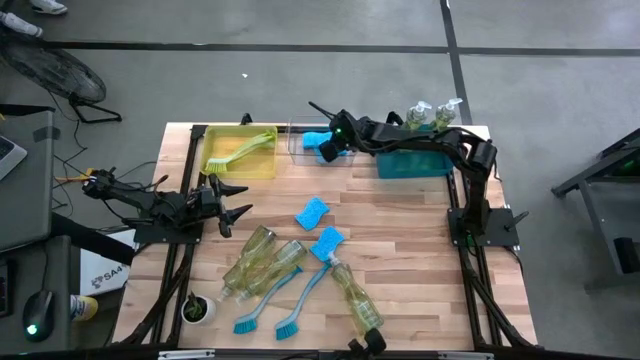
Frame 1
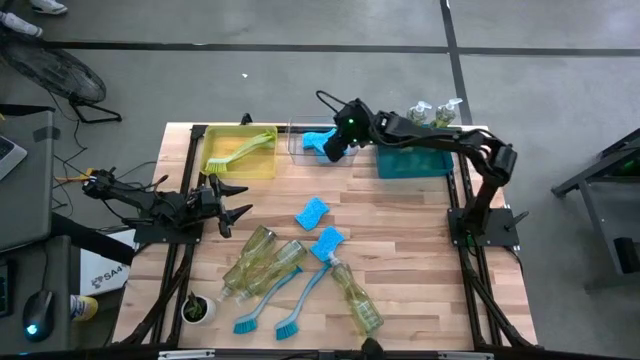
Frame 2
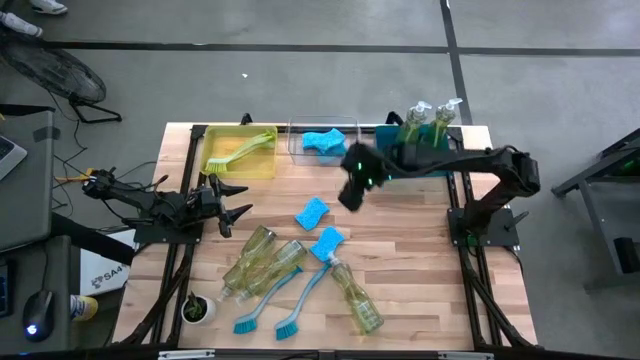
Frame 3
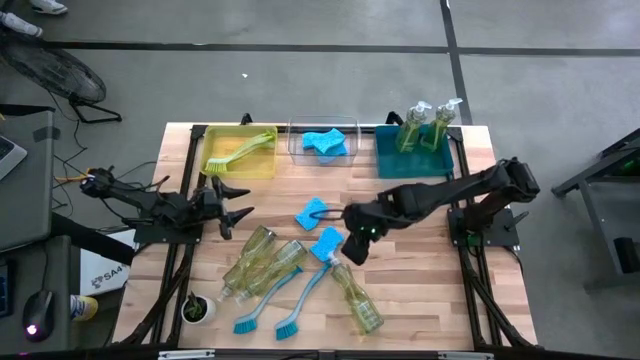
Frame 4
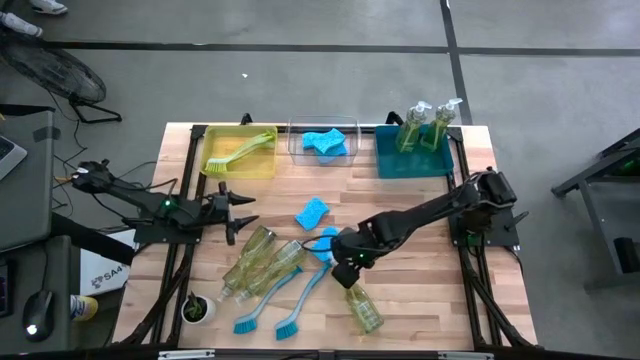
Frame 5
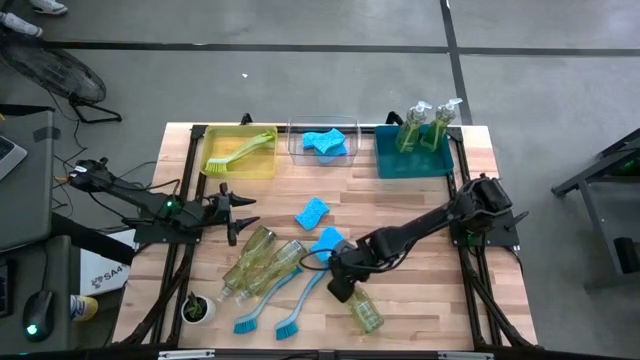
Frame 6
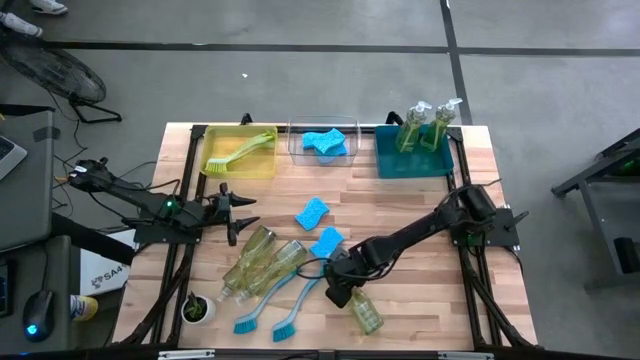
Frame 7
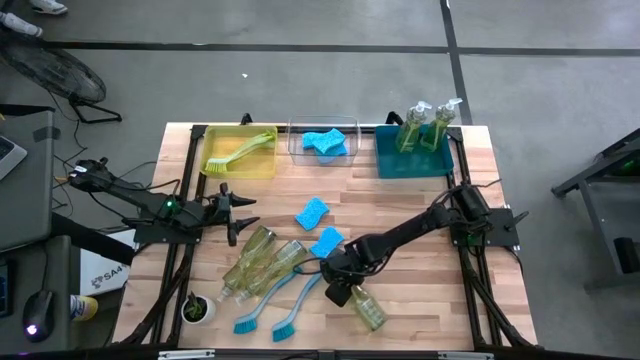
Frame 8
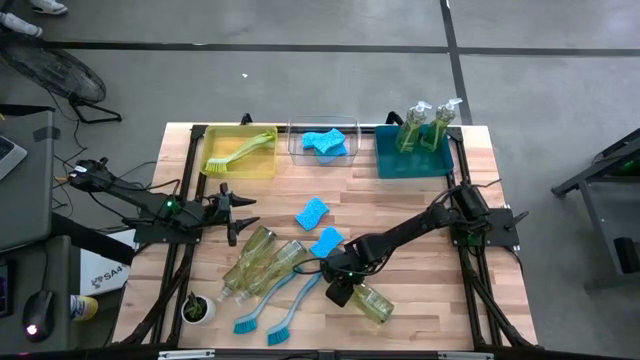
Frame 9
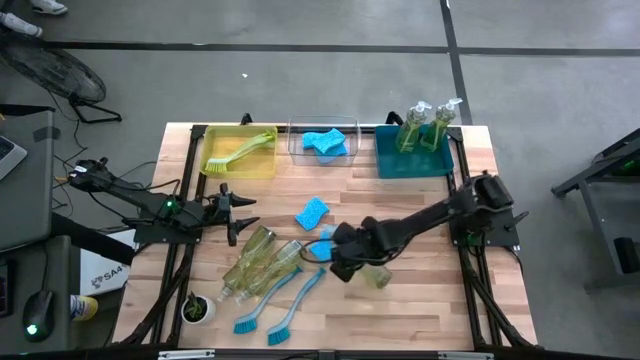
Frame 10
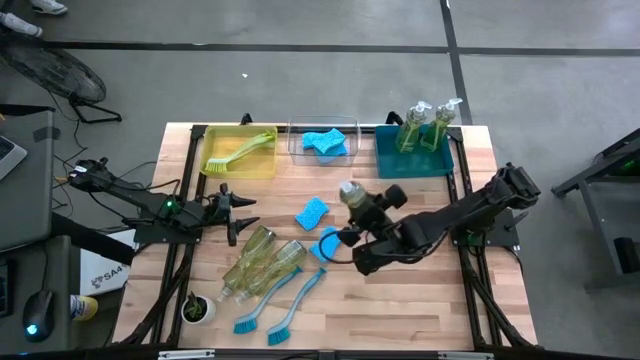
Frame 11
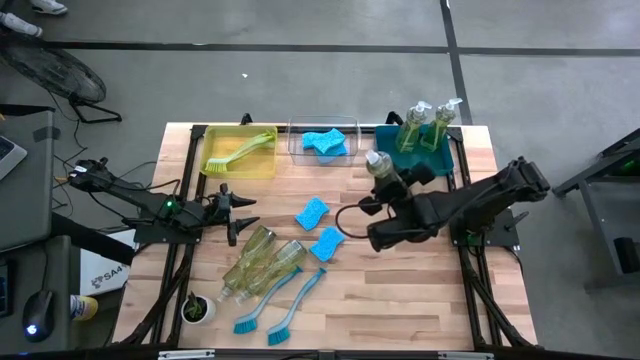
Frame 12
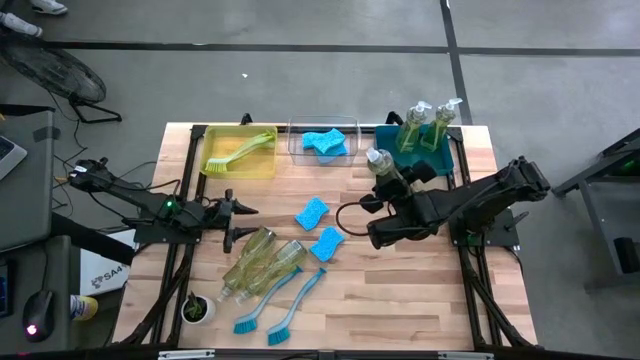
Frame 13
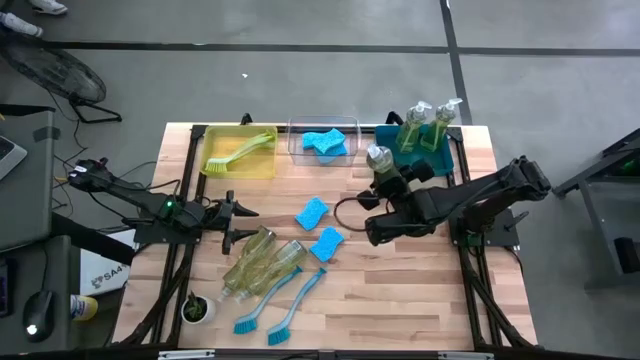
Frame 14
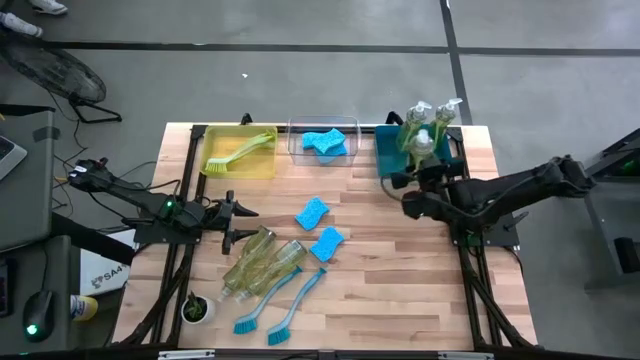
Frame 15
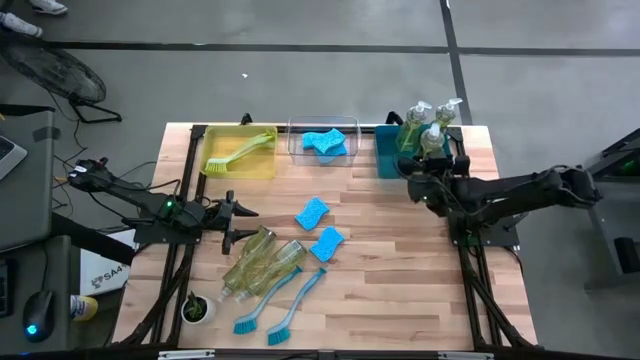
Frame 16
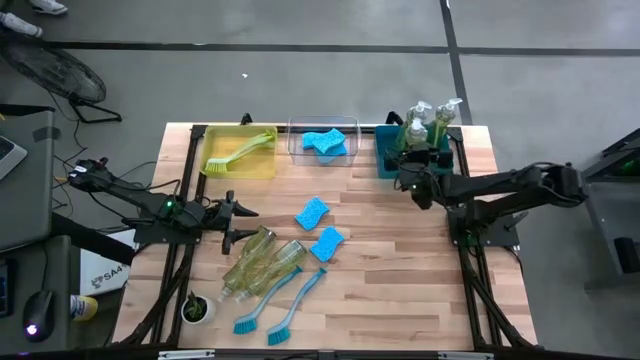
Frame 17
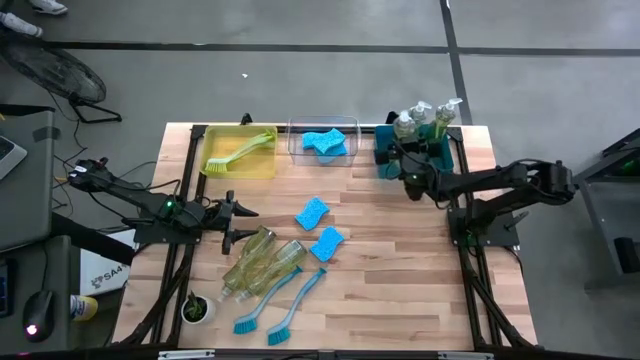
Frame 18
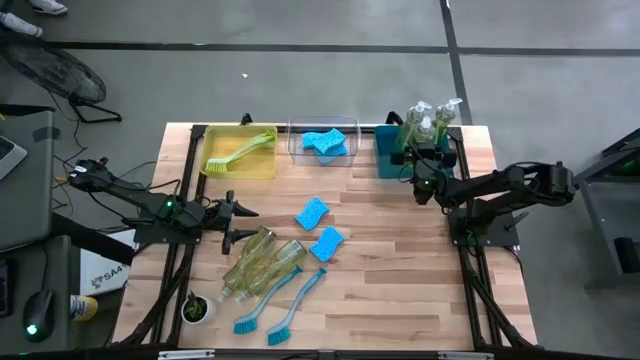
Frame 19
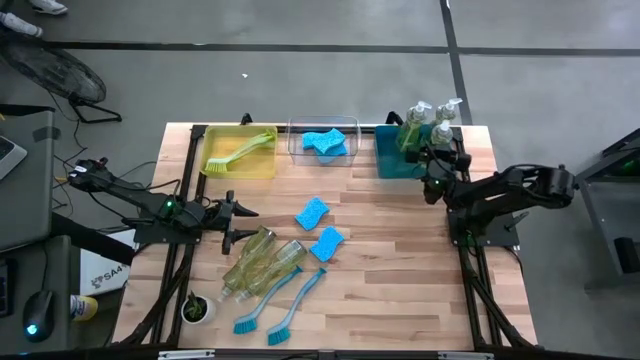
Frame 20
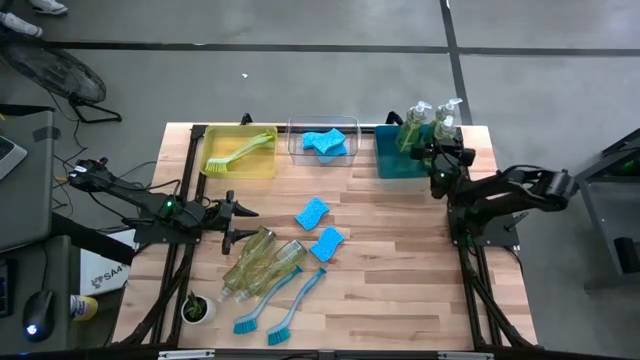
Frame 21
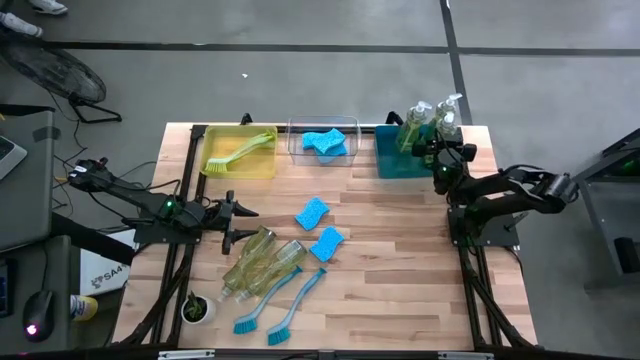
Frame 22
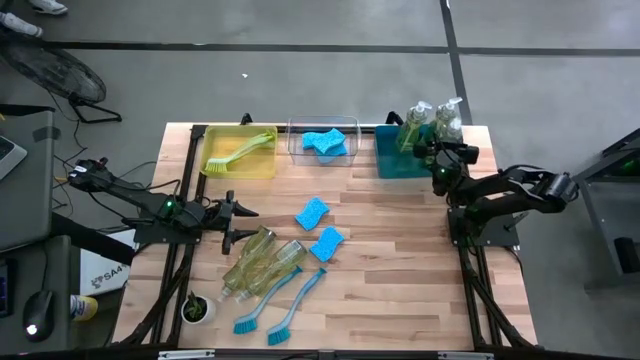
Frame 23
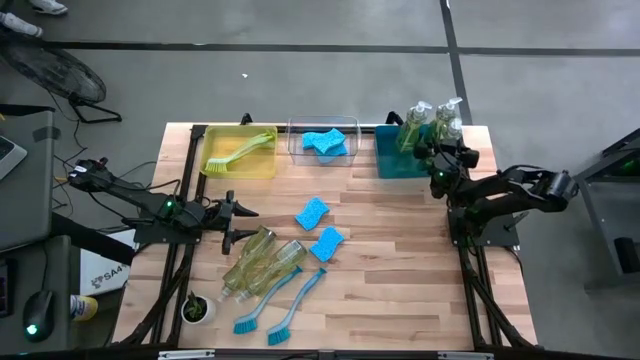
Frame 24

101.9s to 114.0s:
Task: Pick & Place Kitchen Sink Supplies
Put the dish soap into the blue bin

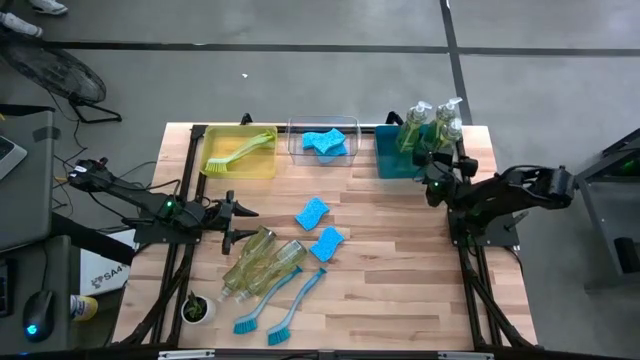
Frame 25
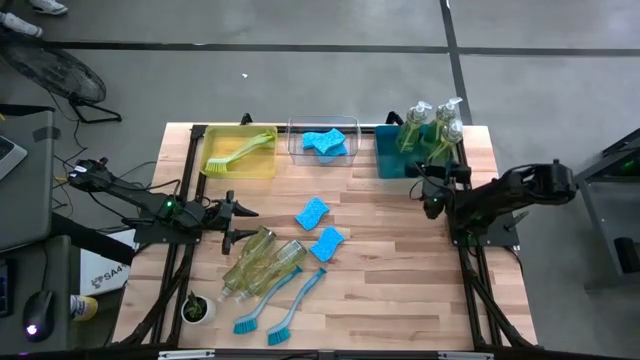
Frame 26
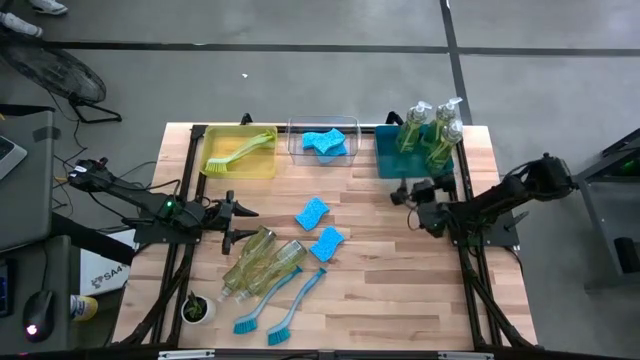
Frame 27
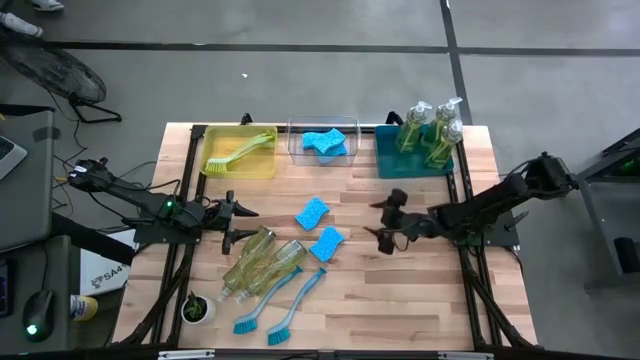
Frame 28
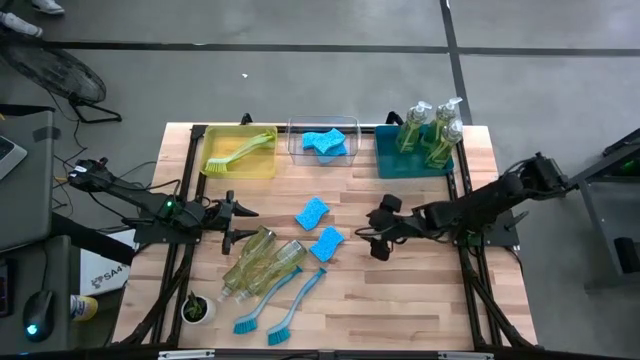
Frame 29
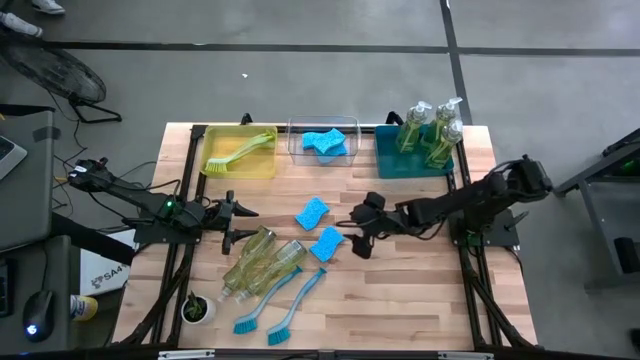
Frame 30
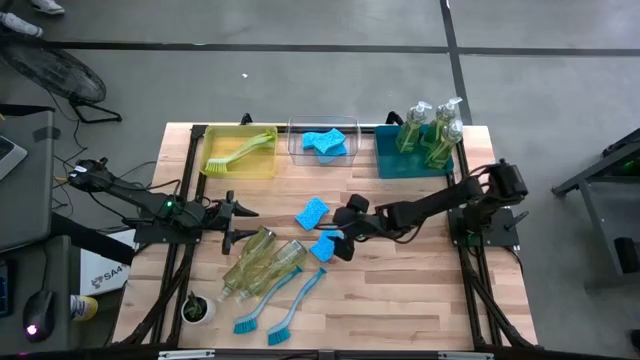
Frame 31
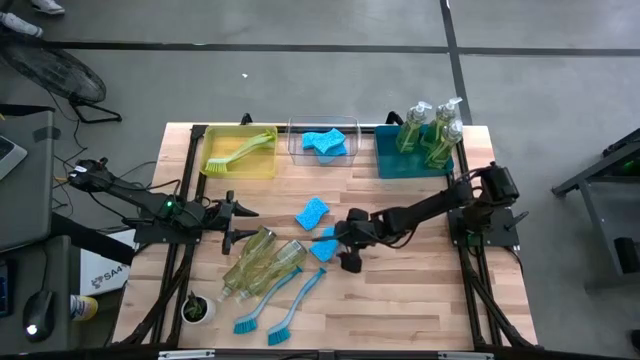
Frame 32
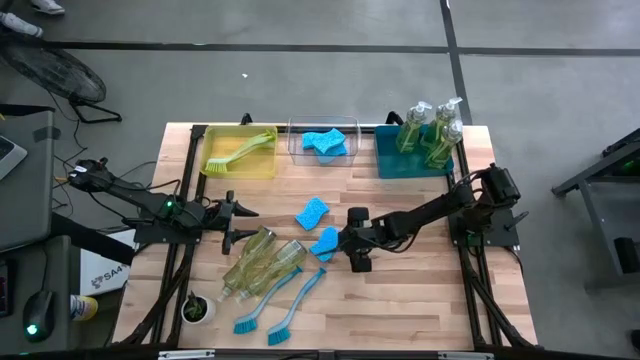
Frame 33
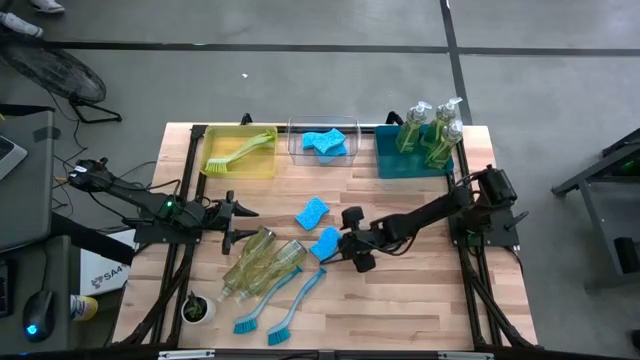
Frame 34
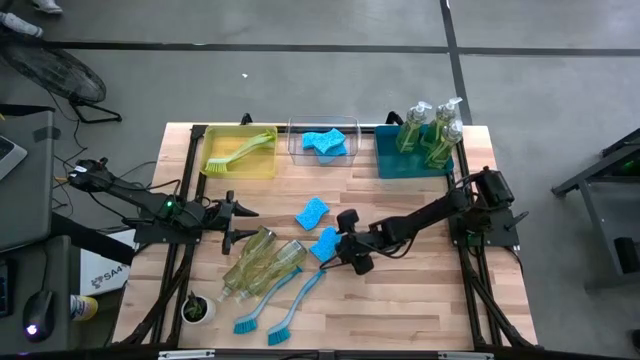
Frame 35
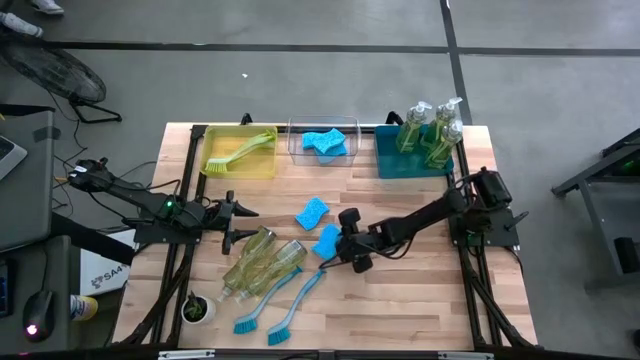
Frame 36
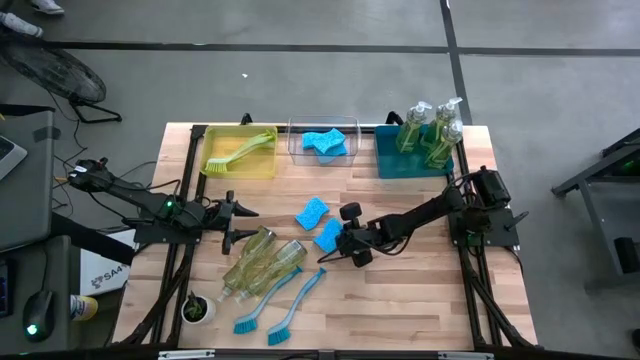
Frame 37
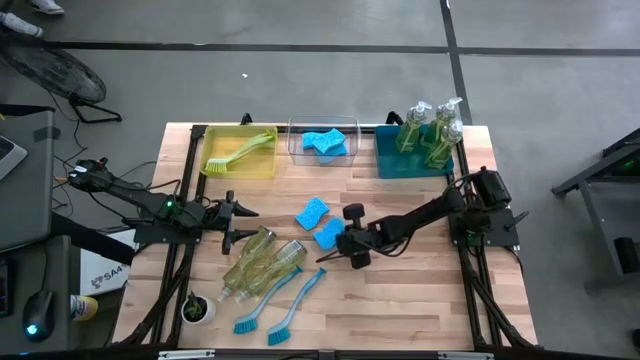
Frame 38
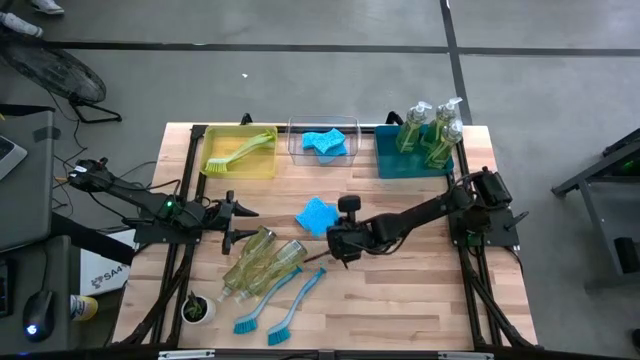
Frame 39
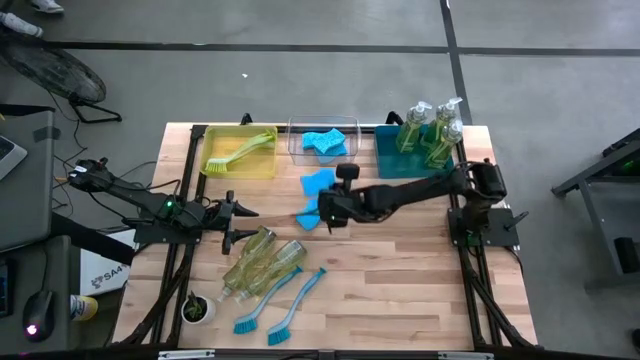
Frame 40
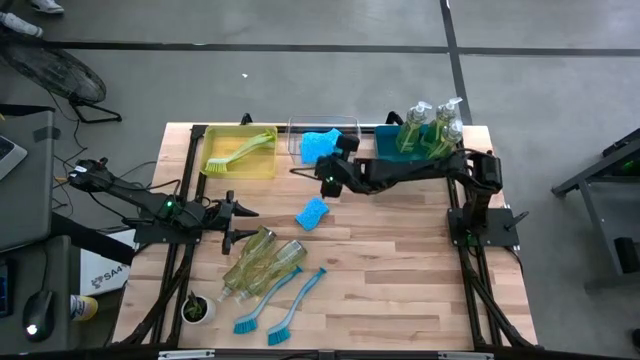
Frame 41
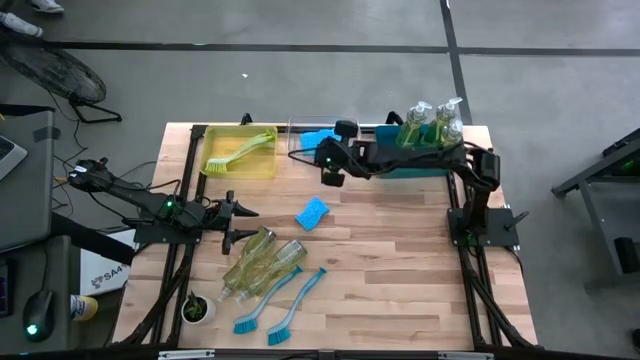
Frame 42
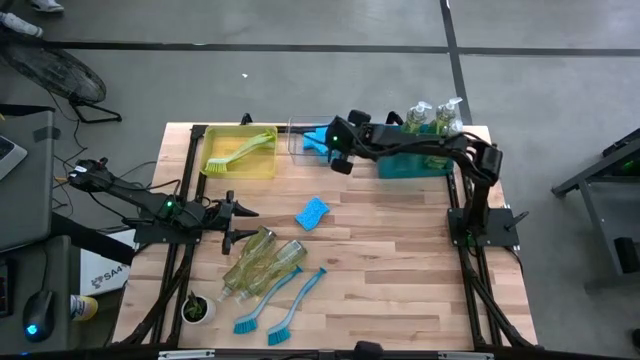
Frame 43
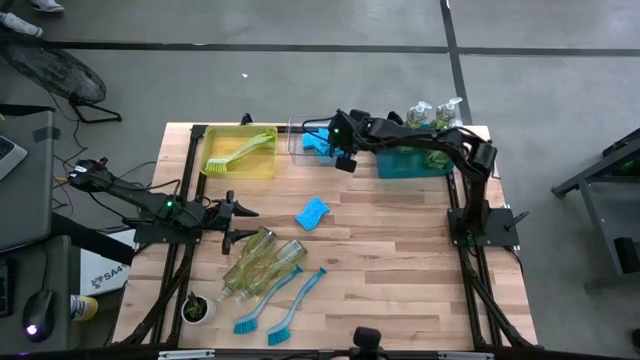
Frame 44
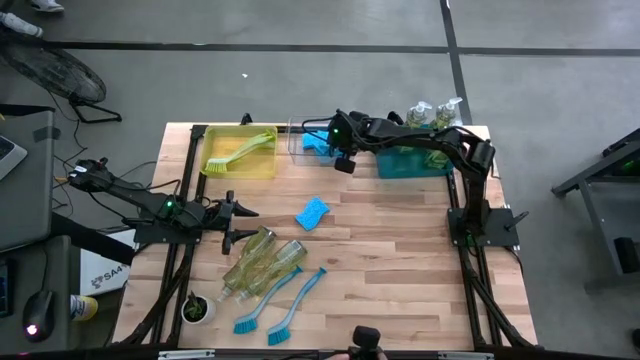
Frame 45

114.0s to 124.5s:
Put the sponge into the transparent bin

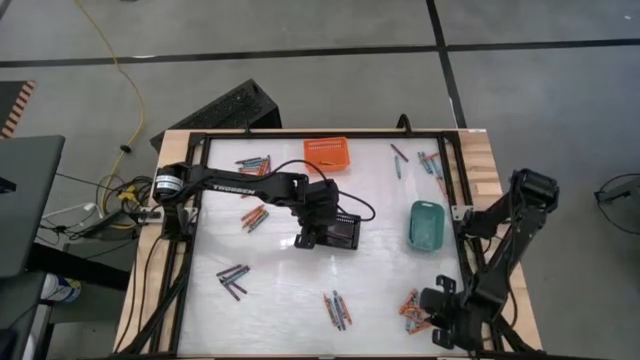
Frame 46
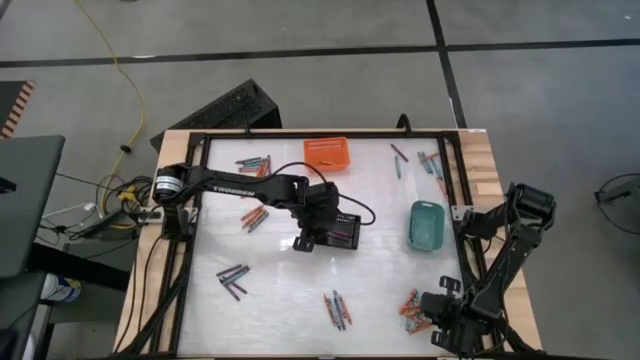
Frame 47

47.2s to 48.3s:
Task: Sort crayons
Put the orange crayon into the orange bin
